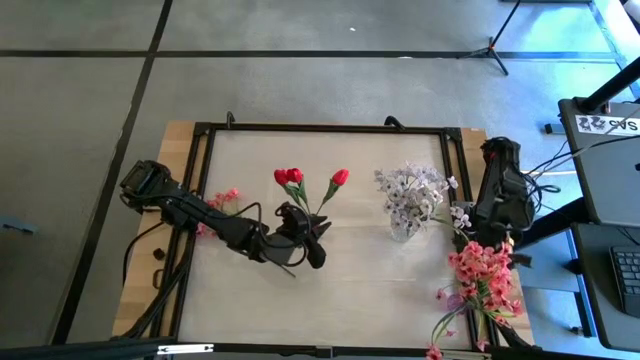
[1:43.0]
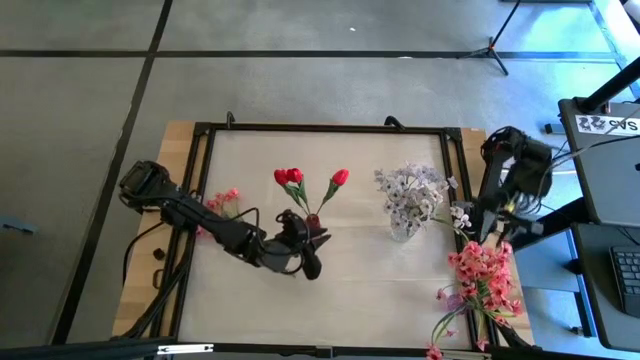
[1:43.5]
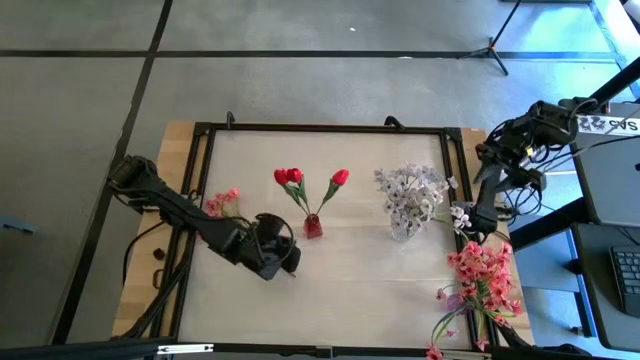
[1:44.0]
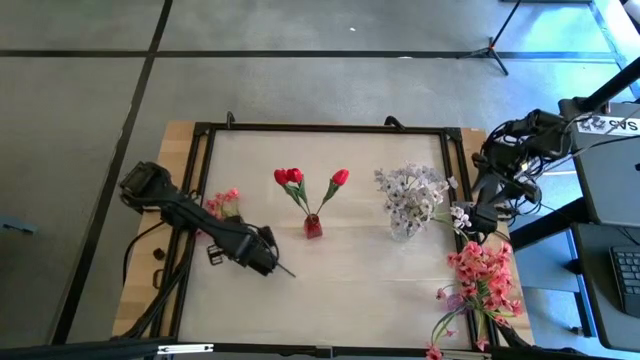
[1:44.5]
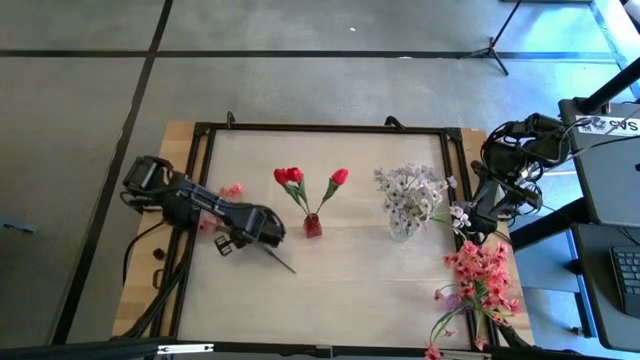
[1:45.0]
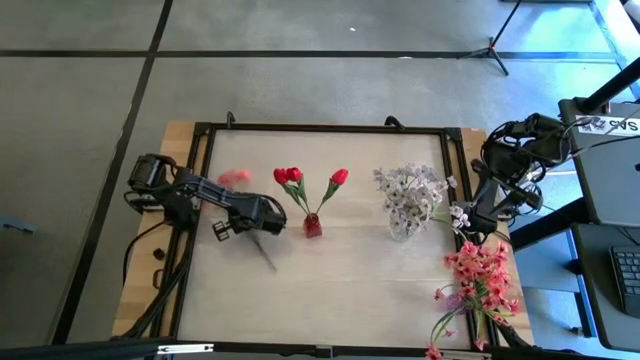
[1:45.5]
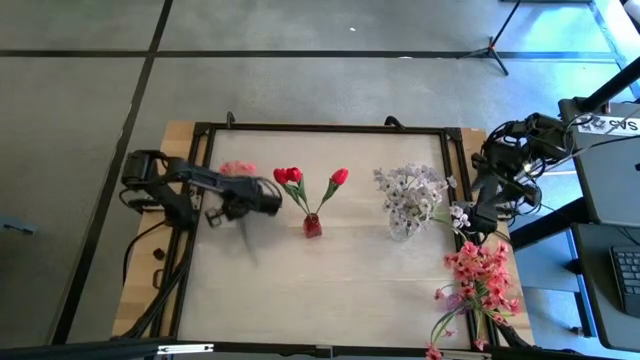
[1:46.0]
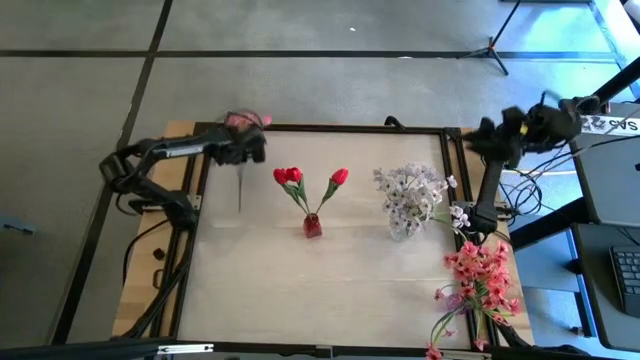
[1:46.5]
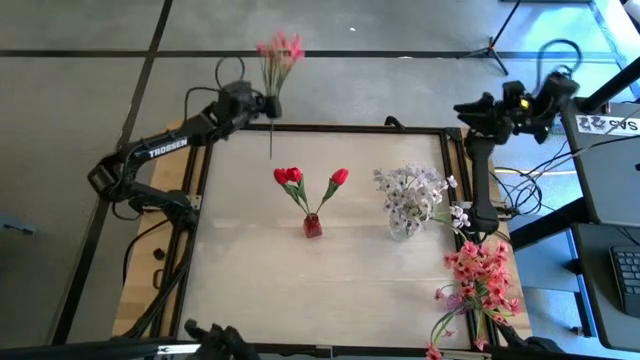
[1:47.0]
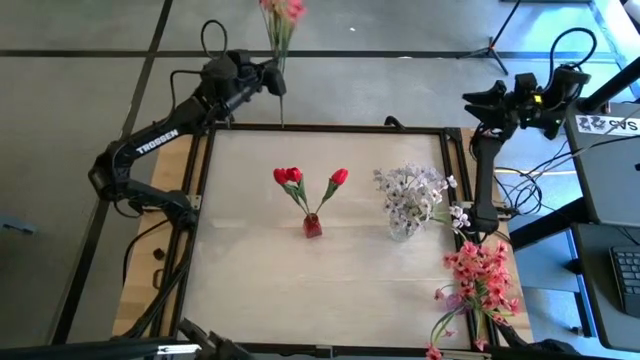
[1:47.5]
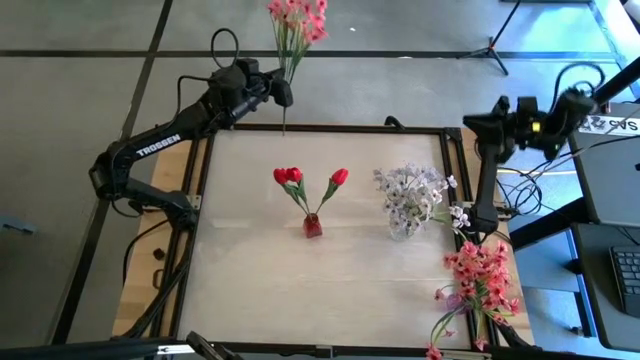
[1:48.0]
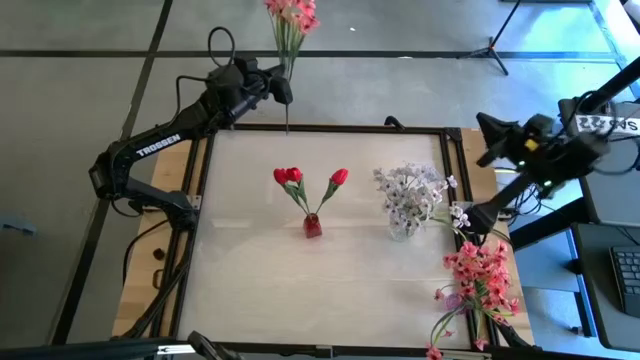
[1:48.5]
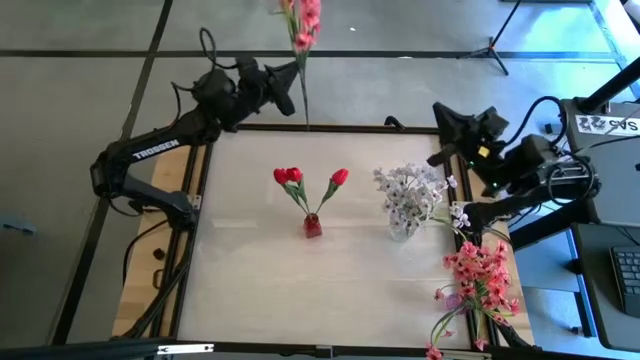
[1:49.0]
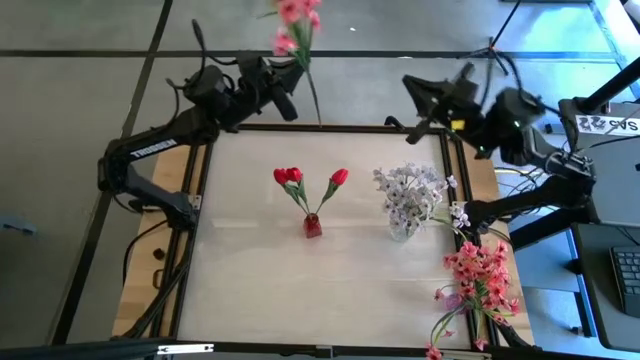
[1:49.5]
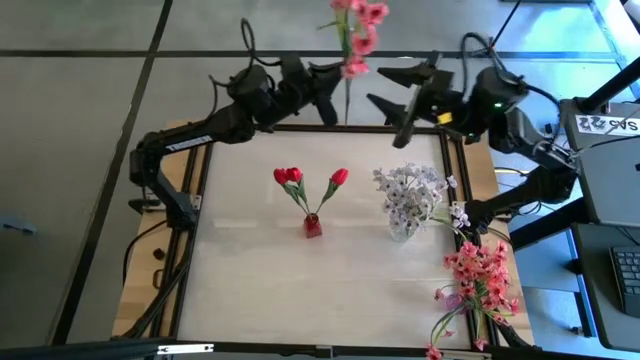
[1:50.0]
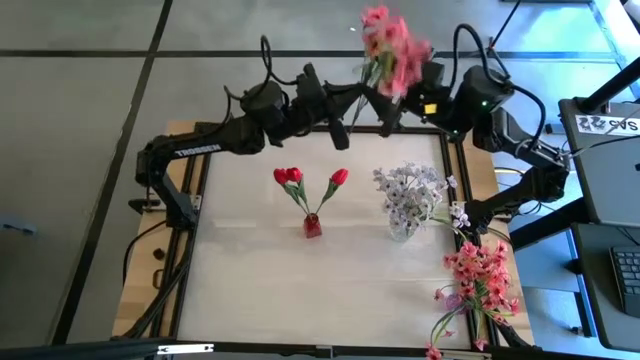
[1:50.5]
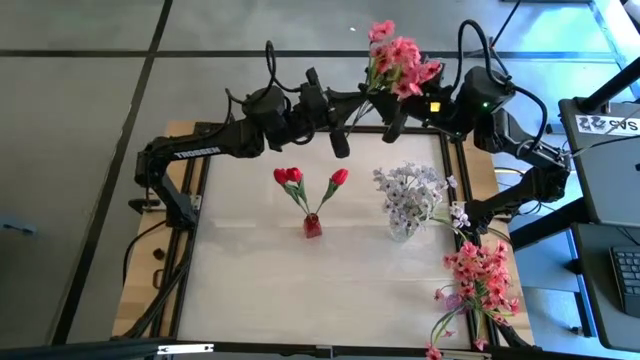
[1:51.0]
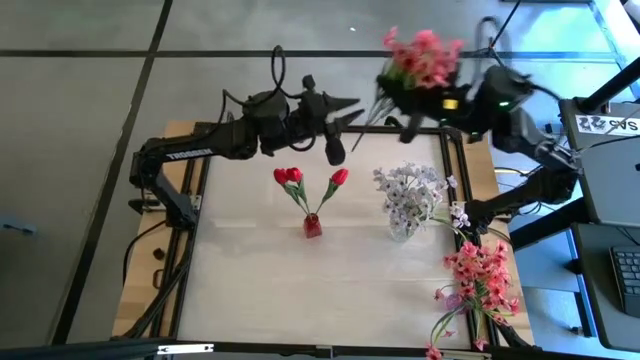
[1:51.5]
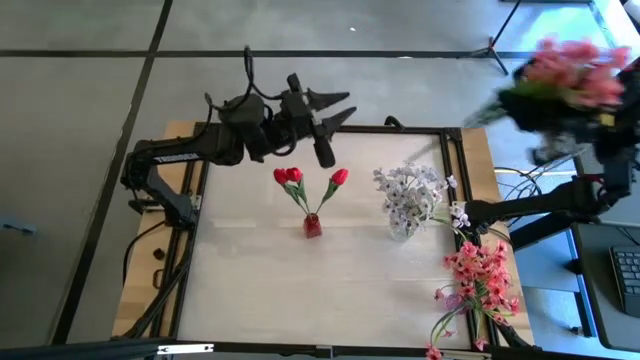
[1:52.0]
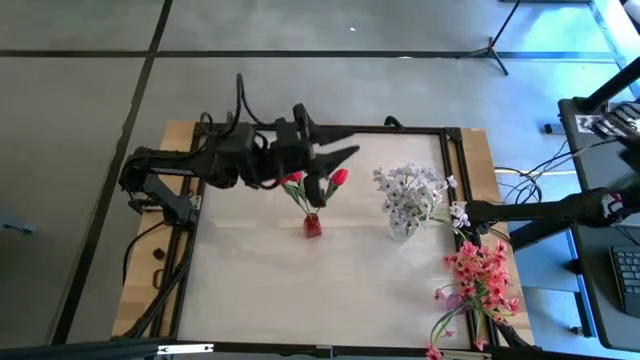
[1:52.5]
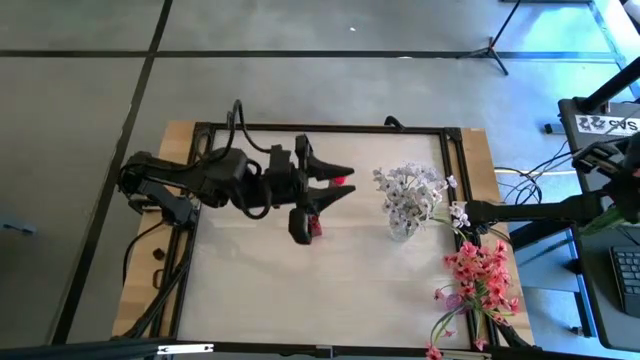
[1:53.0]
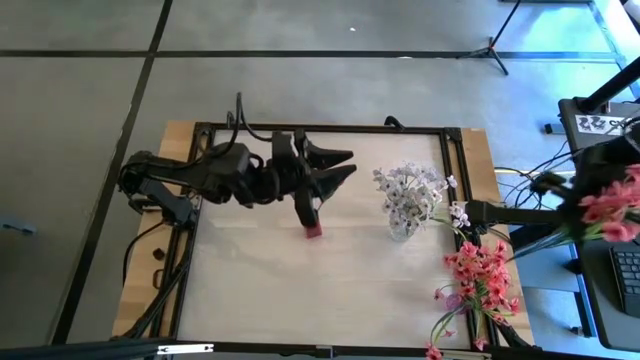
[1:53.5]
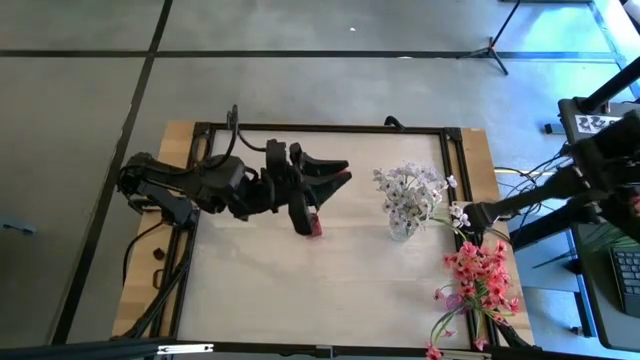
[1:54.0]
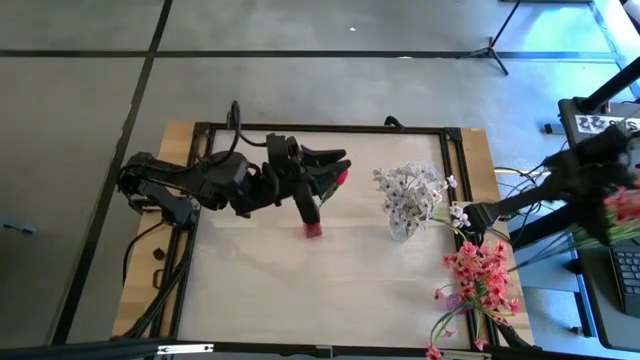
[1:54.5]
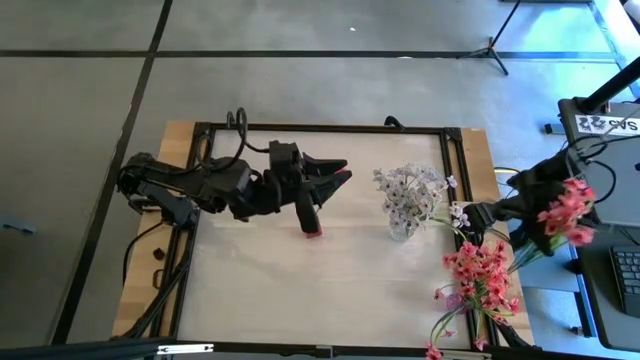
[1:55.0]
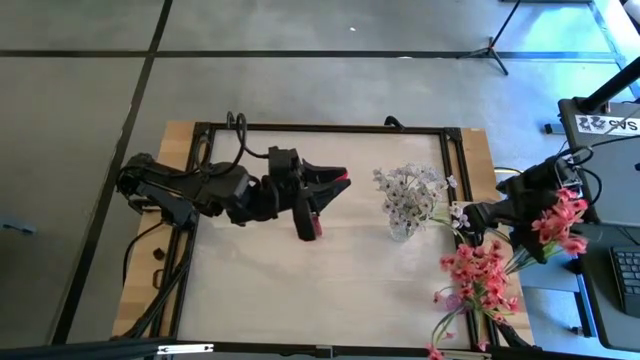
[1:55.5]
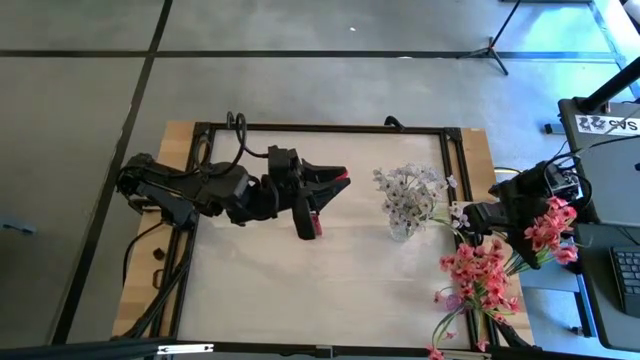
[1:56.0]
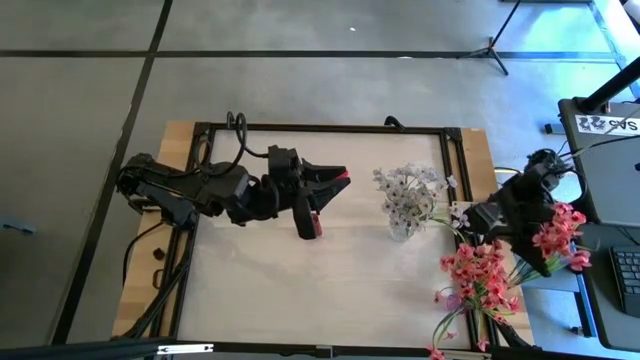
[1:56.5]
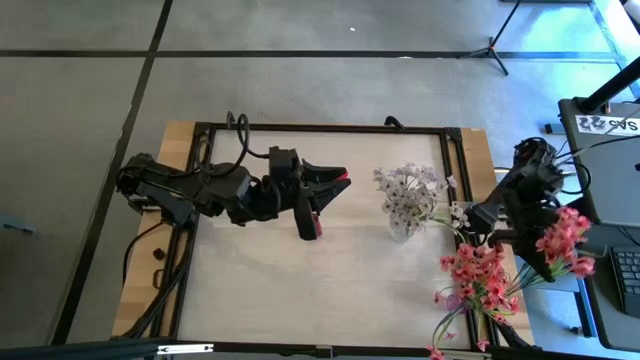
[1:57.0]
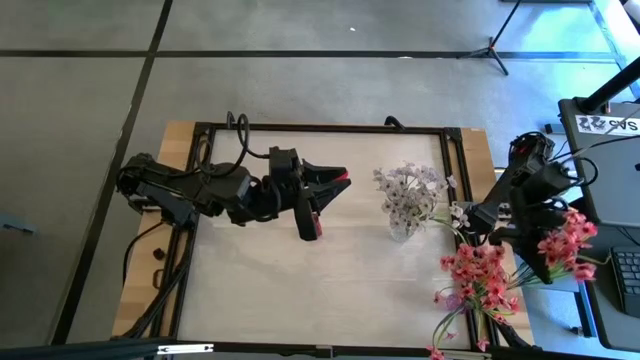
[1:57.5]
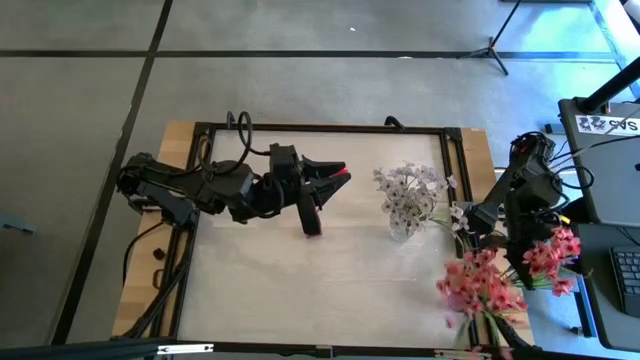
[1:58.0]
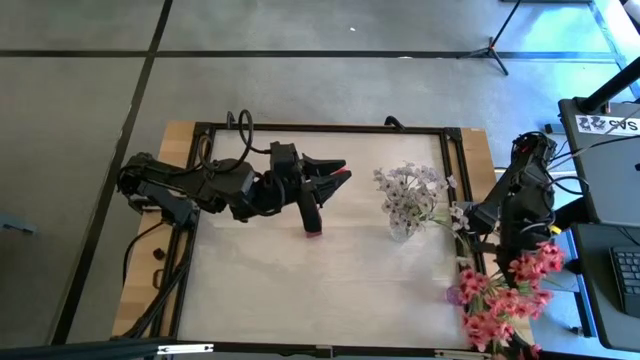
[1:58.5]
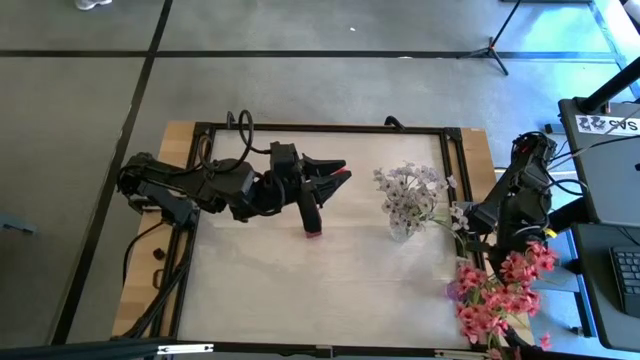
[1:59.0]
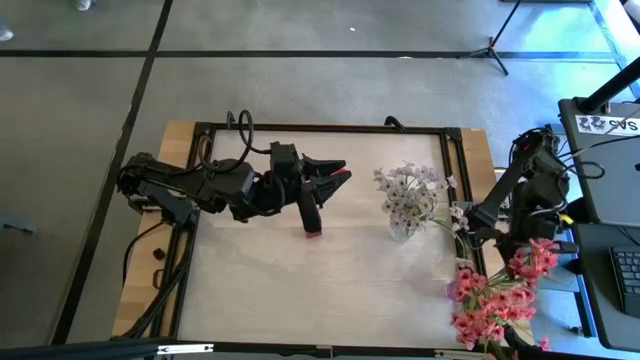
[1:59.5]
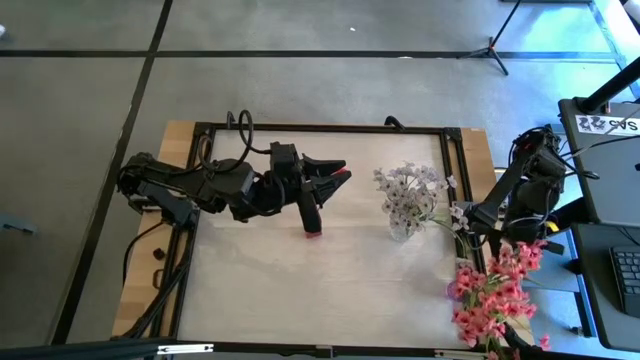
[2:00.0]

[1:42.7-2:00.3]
Task: Sort flowers into vase by color
Put the pink flowers into the pink vase

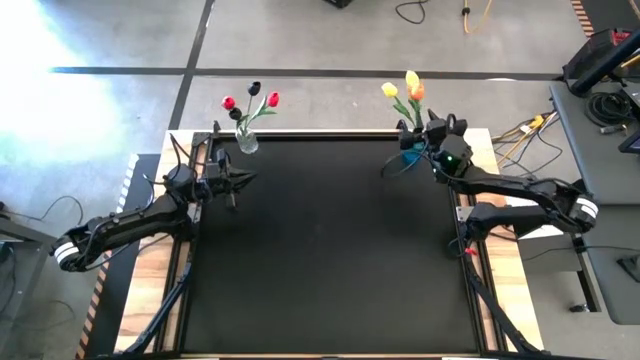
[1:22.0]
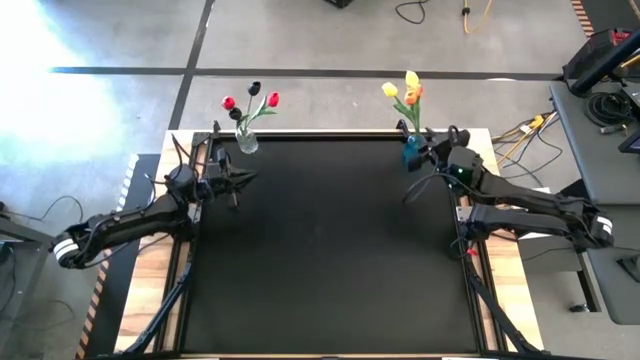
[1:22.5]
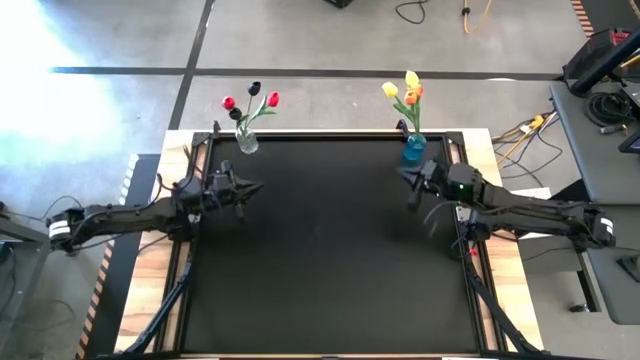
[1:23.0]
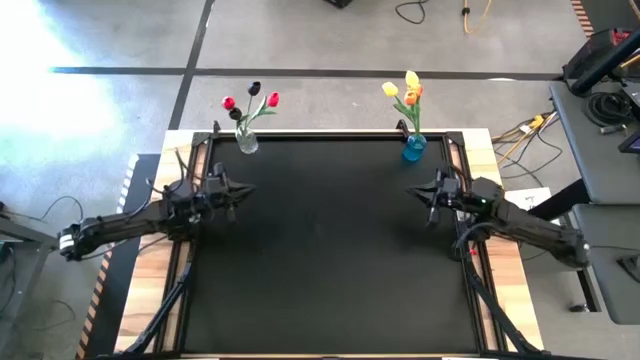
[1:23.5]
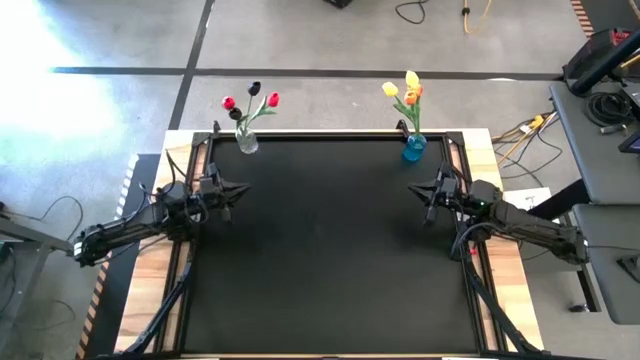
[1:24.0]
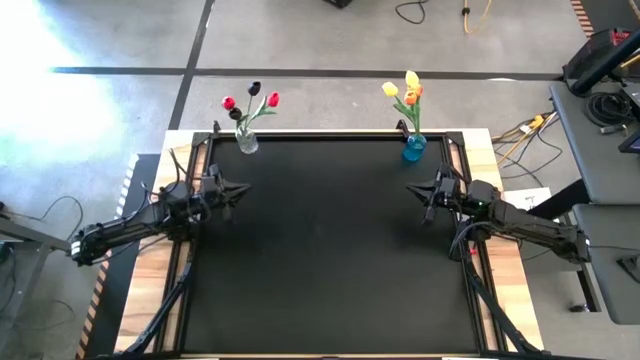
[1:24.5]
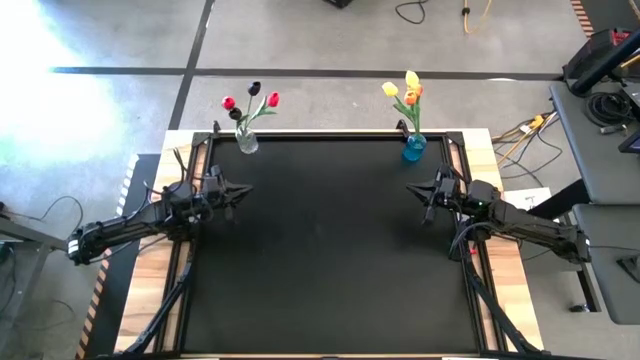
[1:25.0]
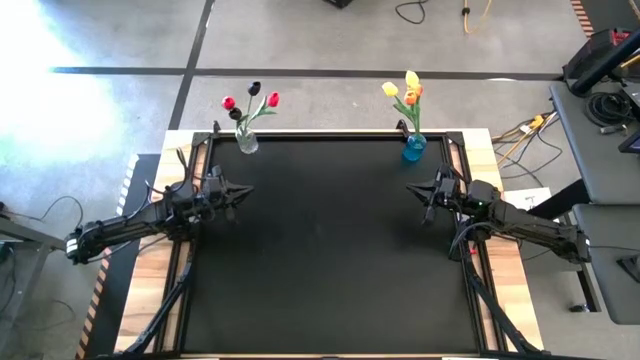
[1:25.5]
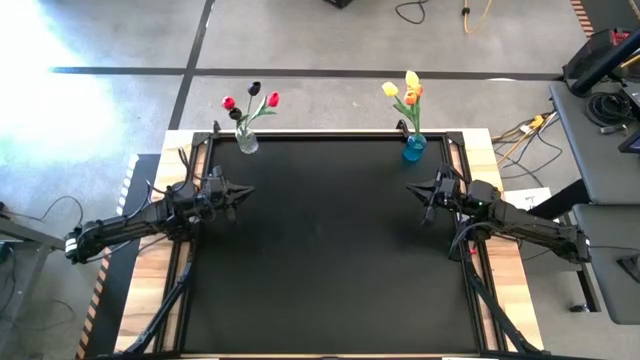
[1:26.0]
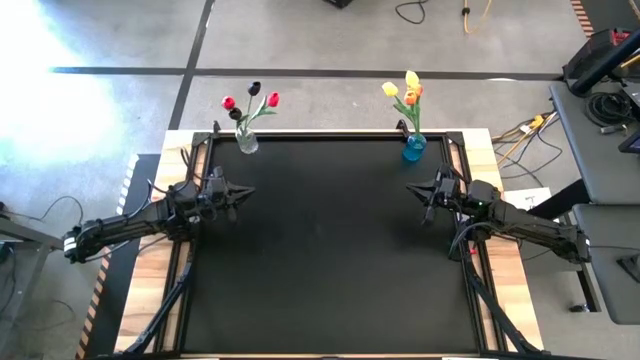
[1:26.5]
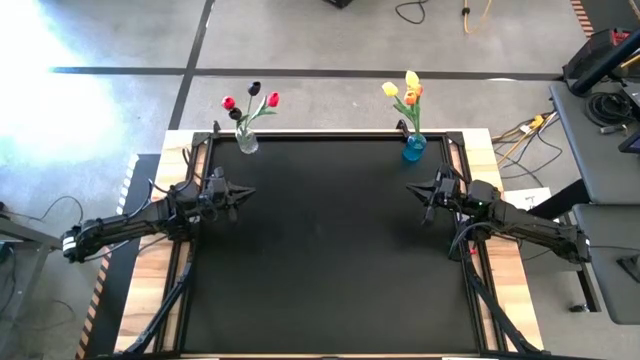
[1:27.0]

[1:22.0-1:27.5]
Task: Sort flowers into vase by color
Return to Home Position
